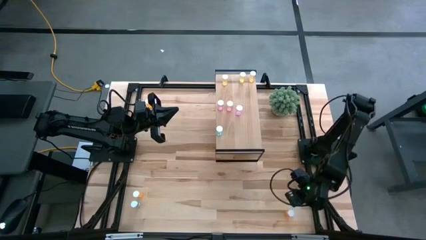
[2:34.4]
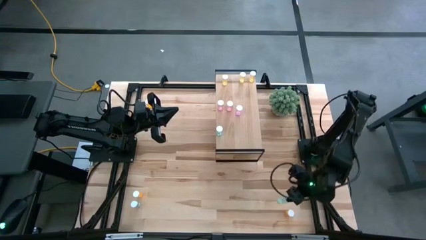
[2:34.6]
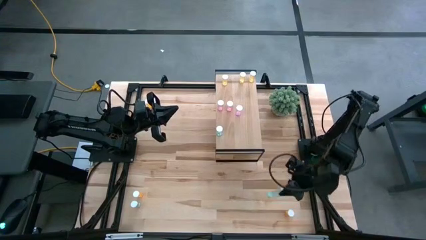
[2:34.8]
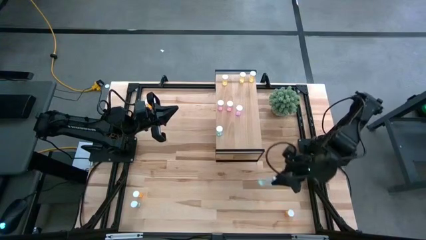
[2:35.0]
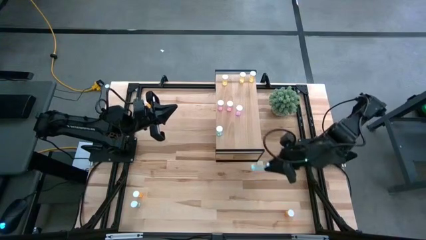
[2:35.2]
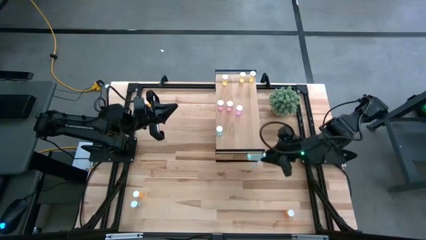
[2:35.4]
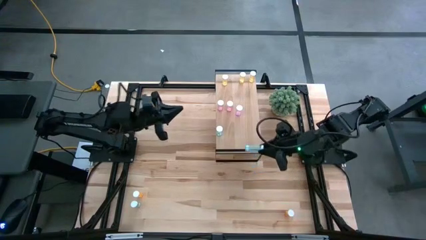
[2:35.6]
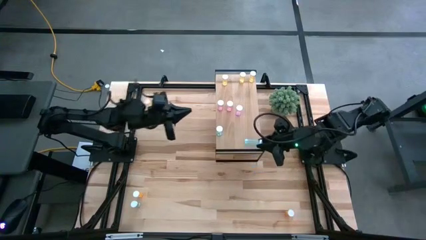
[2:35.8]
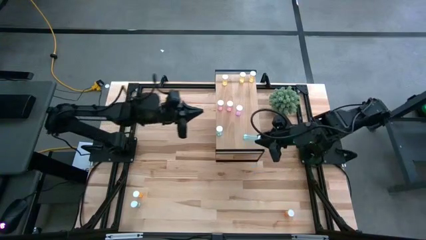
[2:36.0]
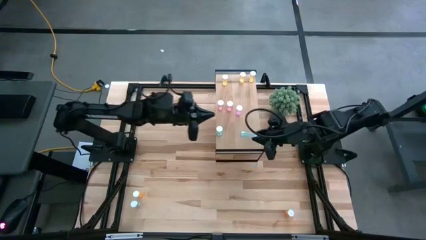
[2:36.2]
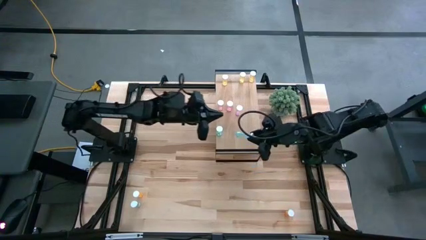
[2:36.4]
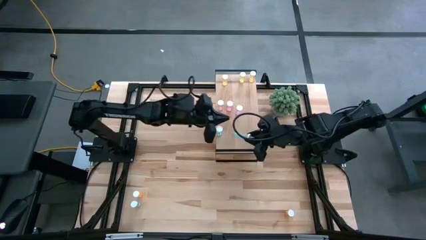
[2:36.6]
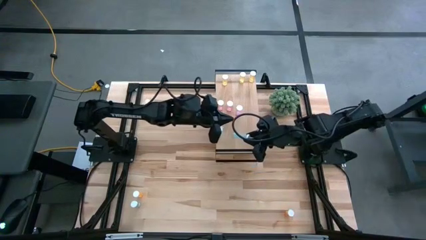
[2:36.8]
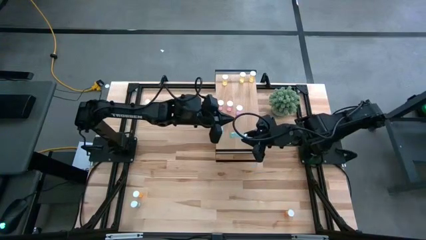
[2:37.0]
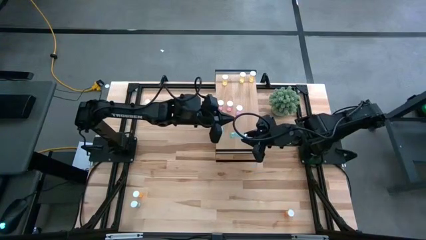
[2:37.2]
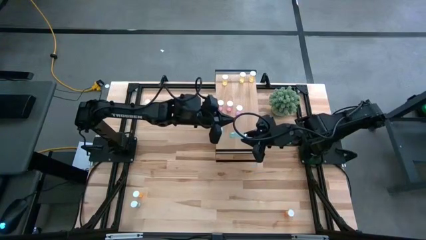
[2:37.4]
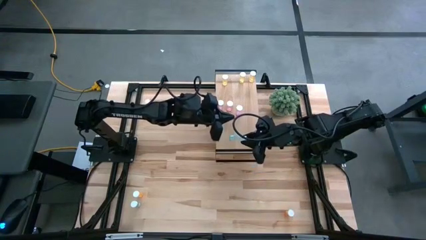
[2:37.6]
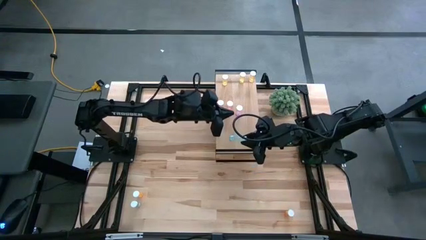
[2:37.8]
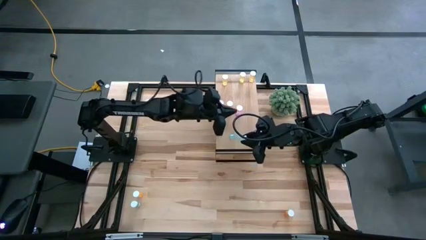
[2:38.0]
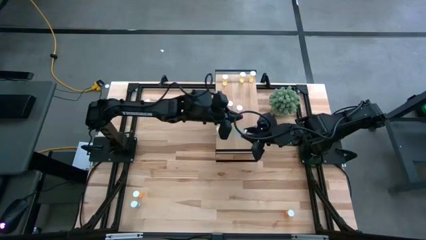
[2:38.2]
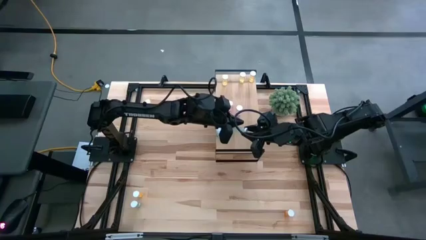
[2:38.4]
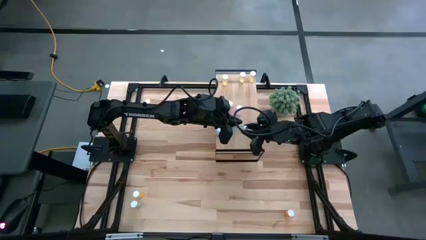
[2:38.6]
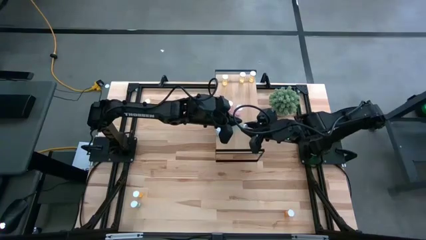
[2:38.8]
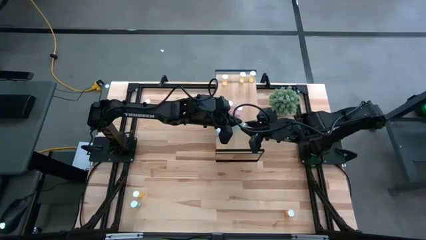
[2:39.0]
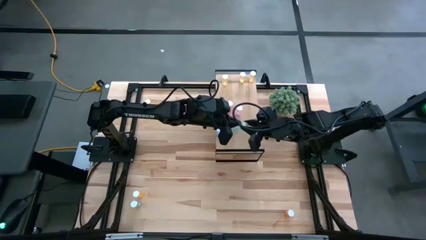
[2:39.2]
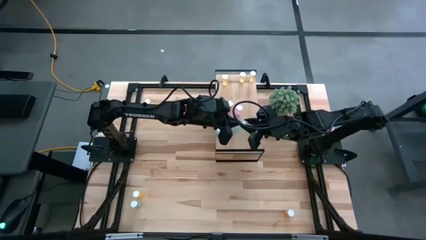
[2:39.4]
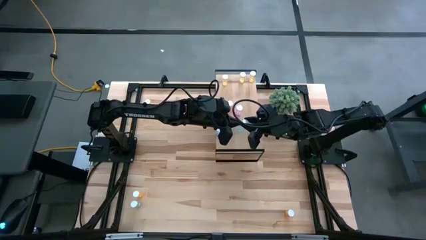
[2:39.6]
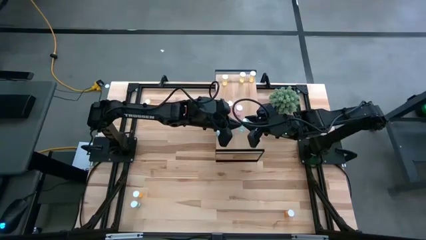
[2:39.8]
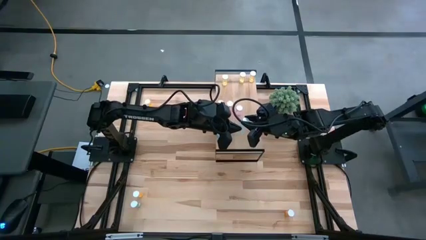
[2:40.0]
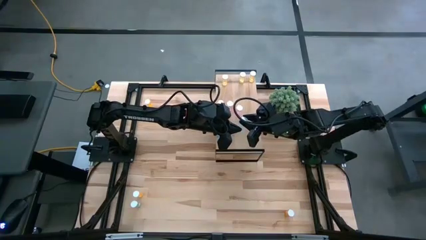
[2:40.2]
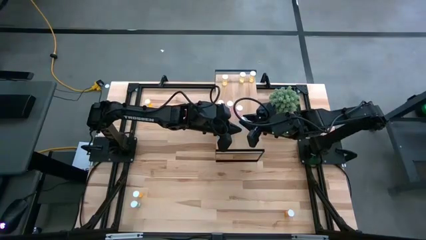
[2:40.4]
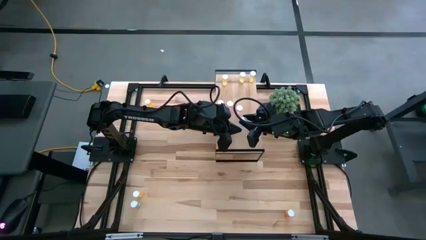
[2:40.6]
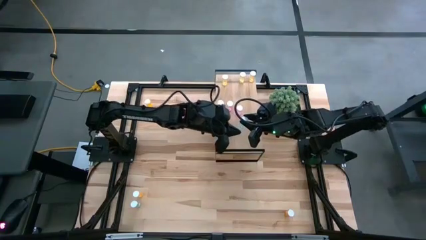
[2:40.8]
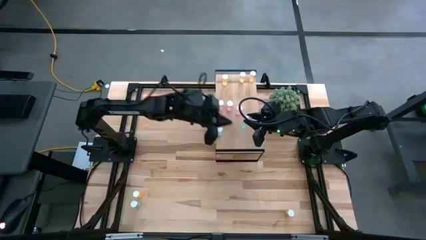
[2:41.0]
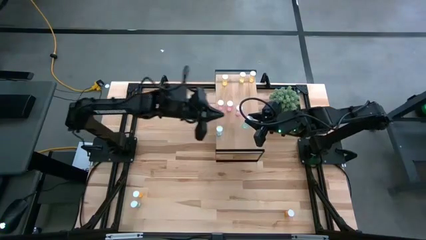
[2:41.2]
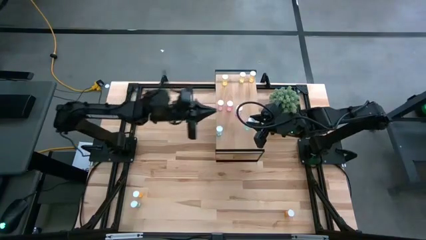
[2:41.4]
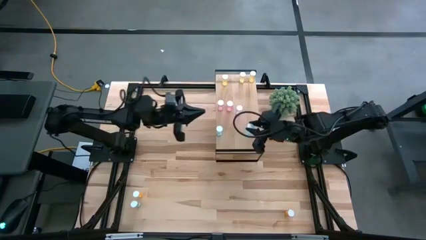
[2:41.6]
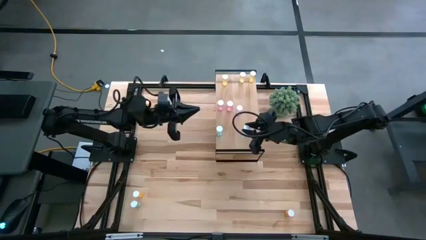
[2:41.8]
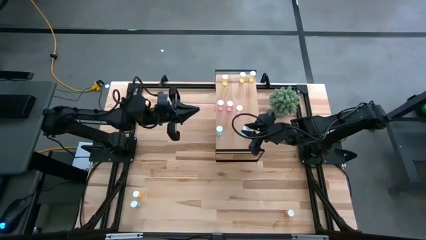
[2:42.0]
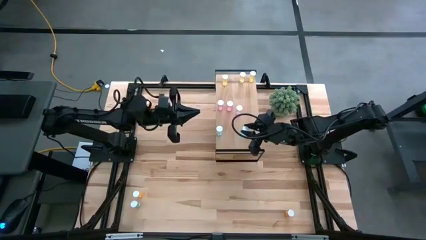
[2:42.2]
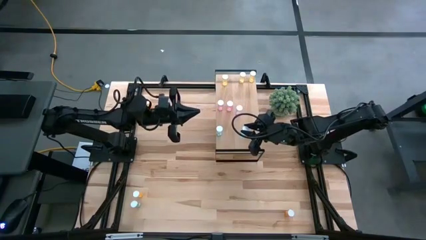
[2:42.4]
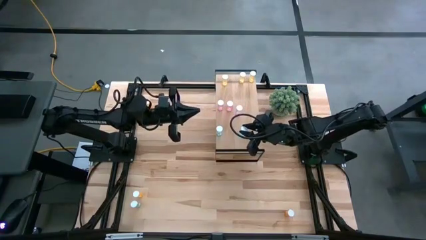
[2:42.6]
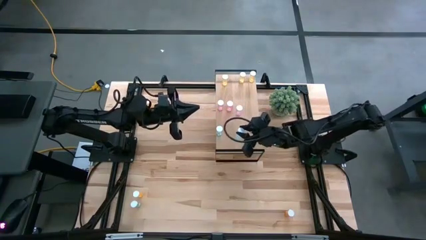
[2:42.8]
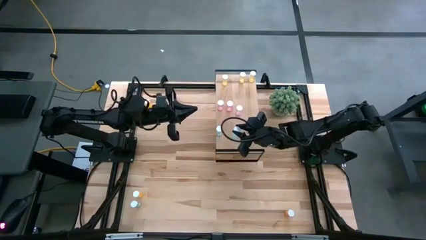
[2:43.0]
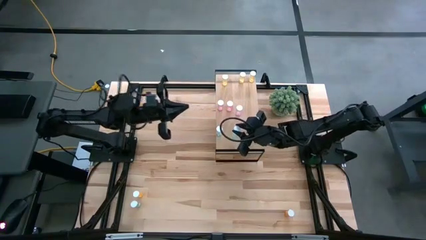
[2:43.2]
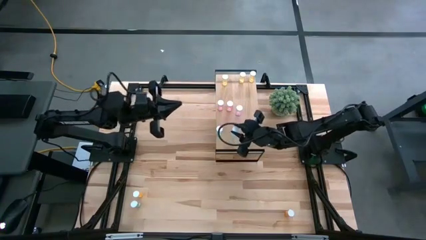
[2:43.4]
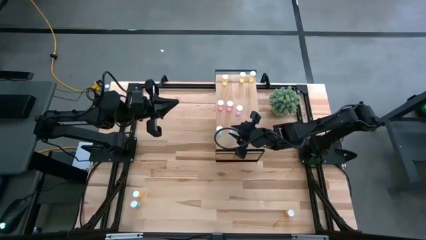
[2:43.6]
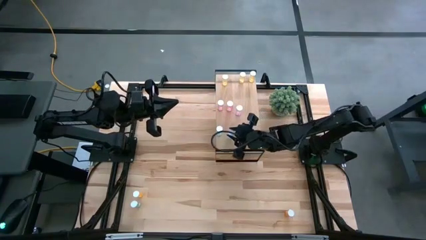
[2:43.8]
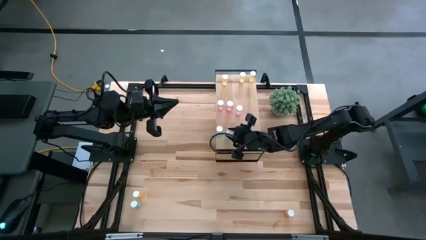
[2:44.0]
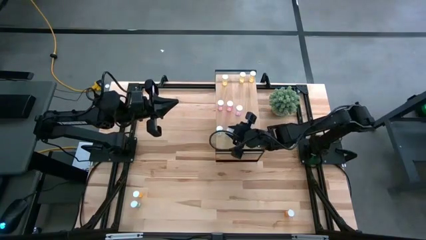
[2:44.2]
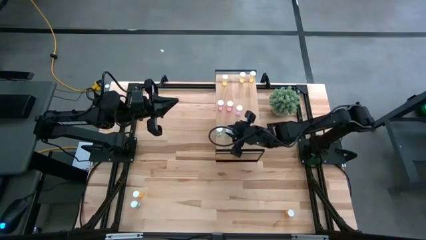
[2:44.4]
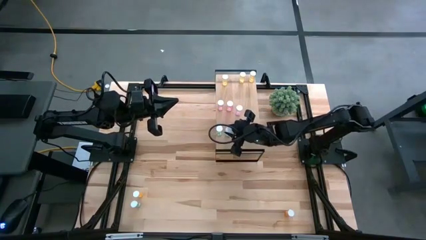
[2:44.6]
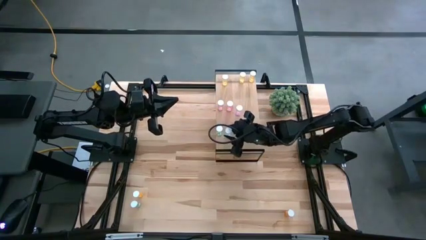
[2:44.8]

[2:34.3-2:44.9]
Task: Pick and place medicine bottles onto shelf by color
Put the right blue pill bottle on the shelf aligned with the other blue pill bottle

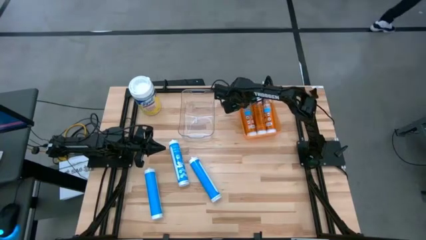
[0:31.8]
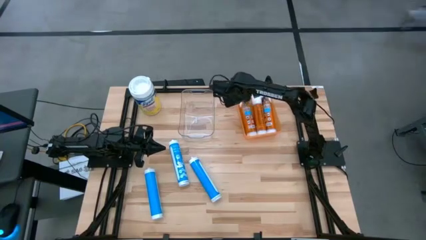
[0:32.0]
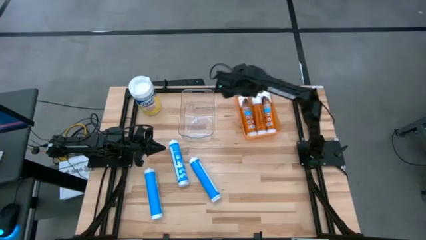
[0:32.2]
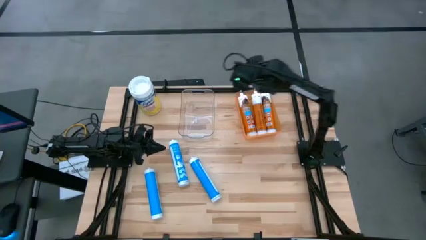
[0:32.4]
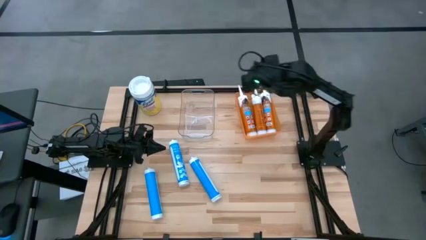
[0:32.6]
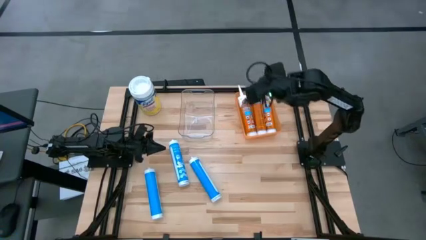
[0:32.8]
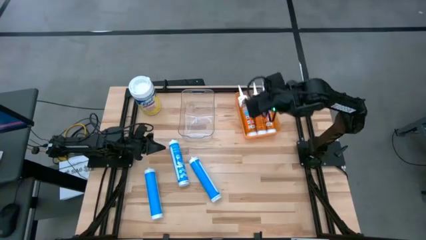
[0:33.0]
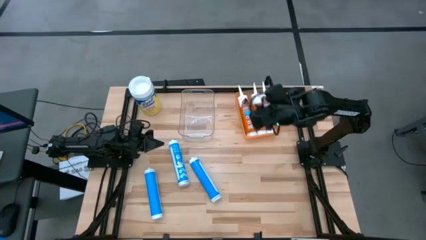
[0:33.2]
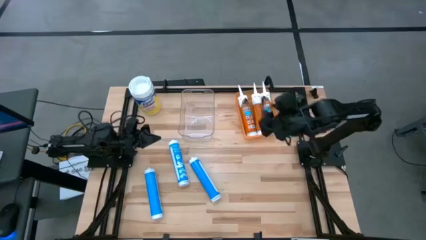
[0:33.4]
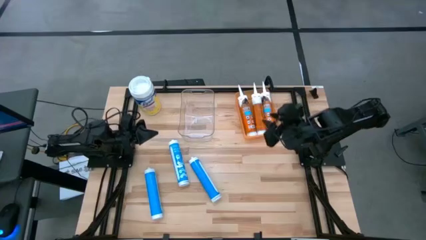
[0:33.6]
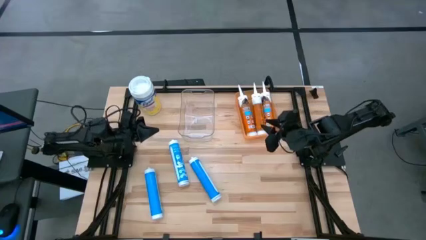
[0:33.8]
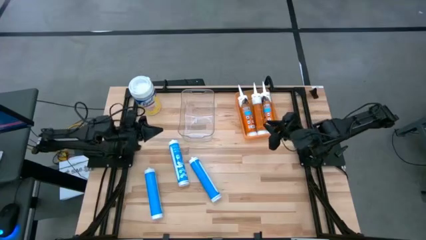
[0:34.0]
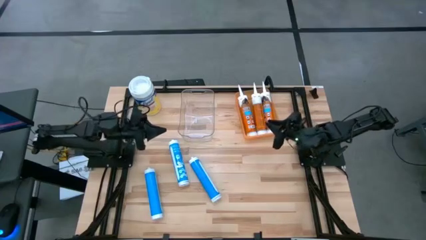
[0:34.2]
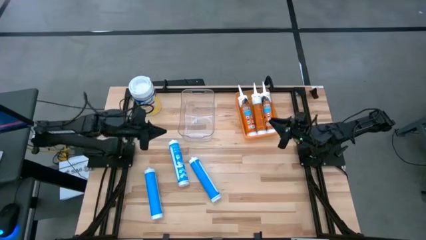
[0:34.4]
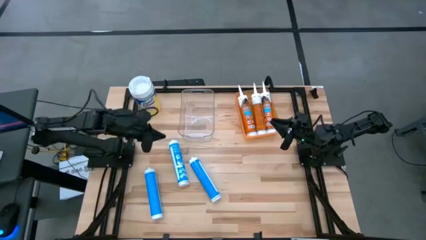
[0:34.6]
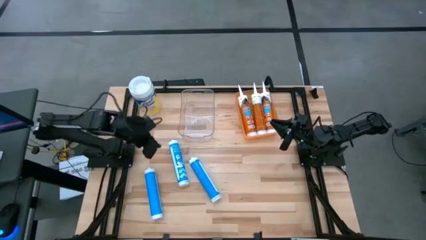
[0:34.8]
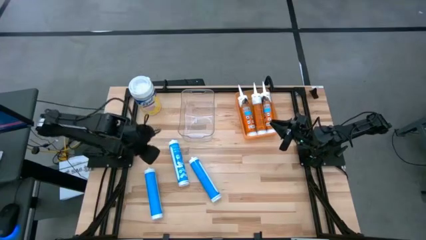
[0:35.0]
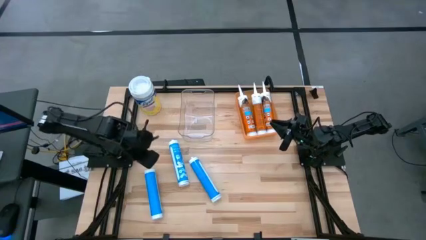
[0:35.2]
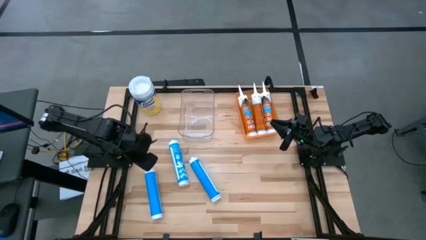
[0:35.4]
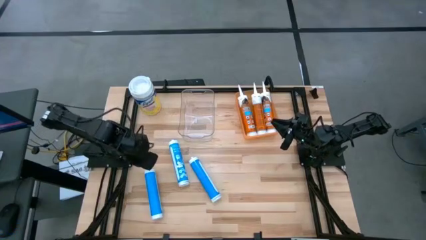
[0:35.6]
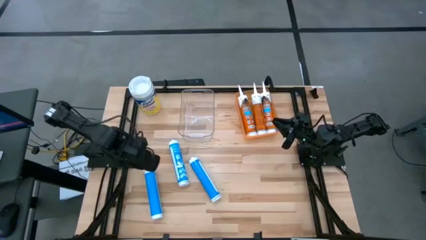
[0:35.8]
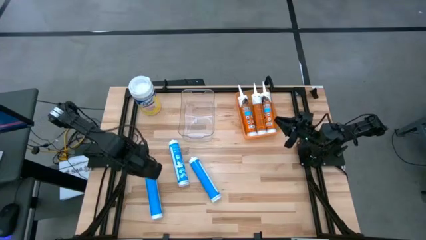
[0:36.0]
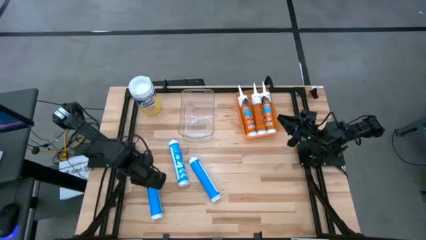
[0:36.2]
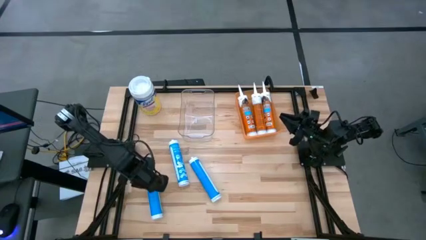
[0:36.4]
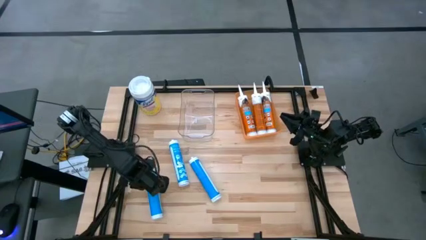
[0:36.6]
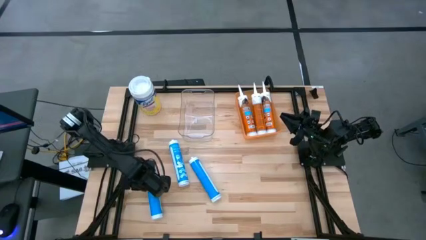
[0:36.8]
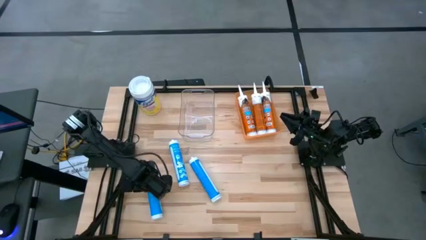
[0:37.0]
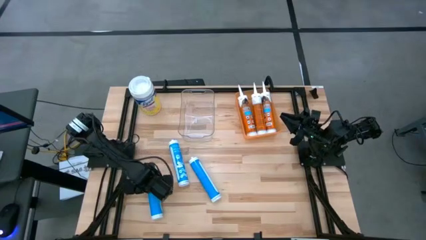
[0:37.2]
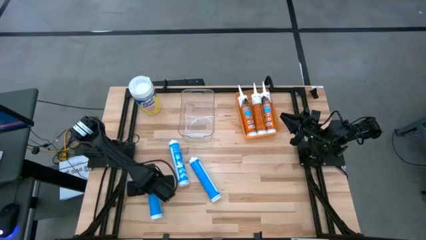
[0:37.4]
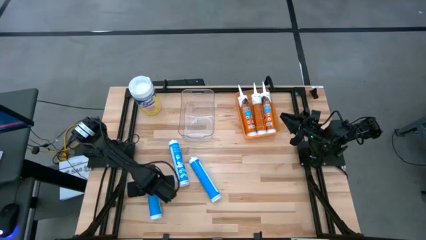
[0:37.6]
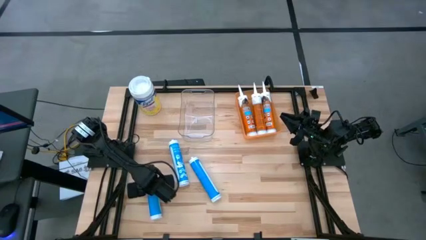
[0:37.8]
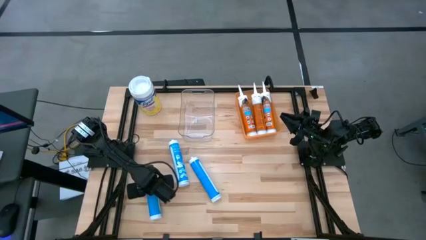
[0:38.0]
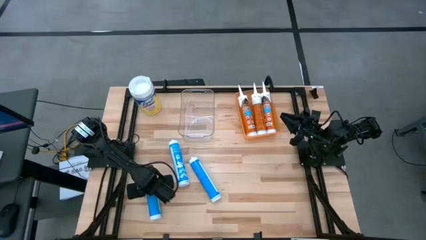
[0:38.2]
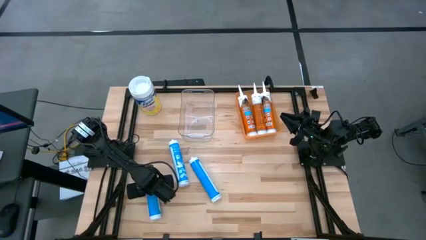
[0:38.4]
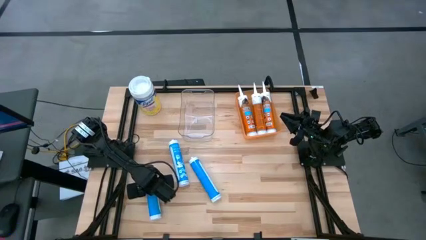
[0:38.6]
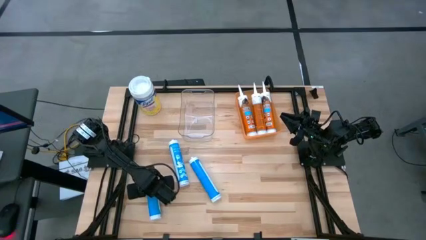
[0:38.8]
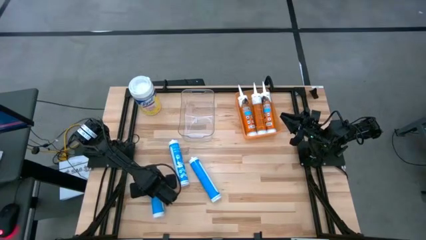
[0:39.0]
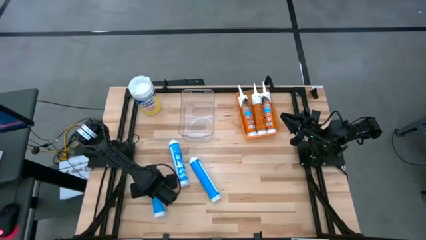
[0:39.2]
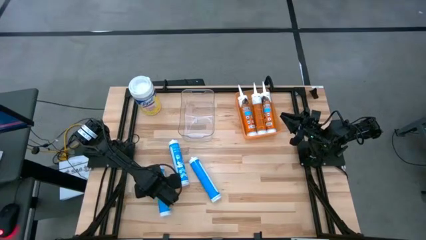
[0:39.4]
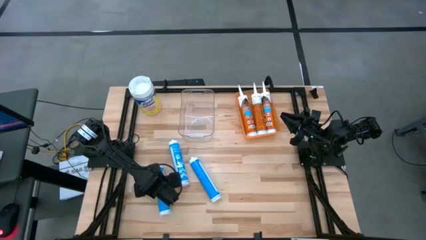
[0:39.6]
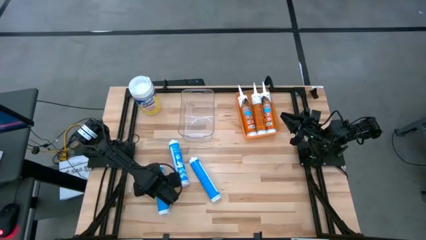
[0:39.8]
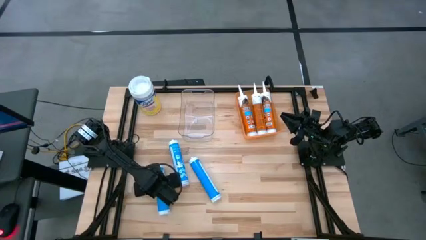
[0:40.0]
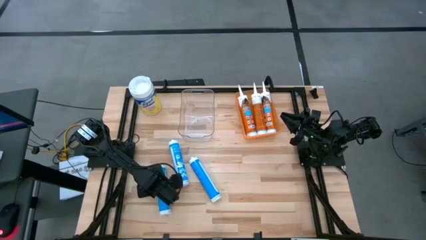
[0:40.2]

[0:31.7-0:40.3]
Task: Pick & place silicon tubes, Sealant and Lysol wipes
Put the left blue sealant into the transparent bin
